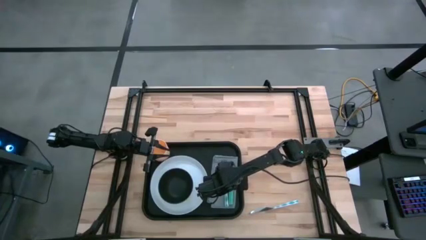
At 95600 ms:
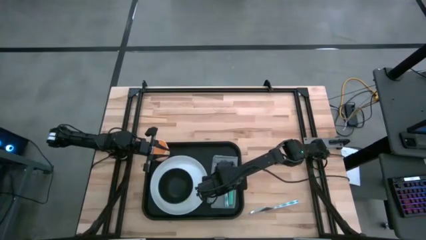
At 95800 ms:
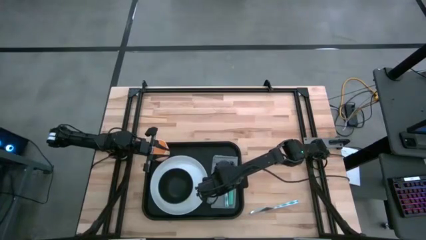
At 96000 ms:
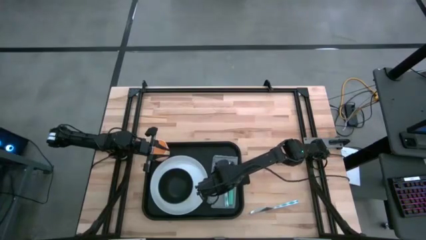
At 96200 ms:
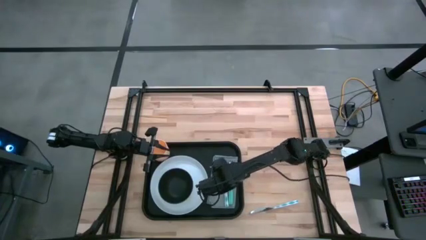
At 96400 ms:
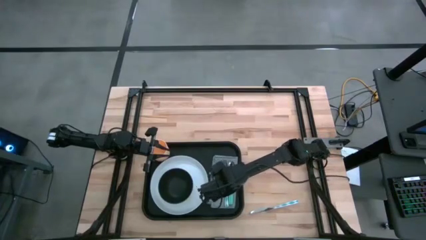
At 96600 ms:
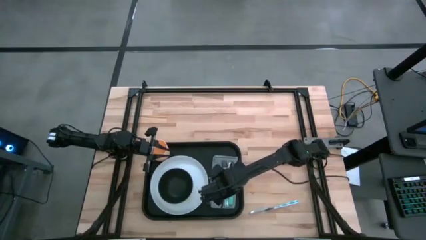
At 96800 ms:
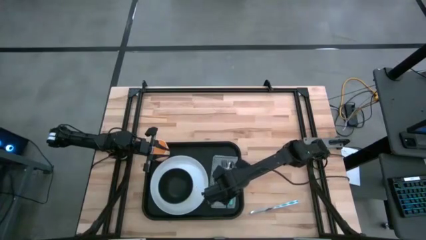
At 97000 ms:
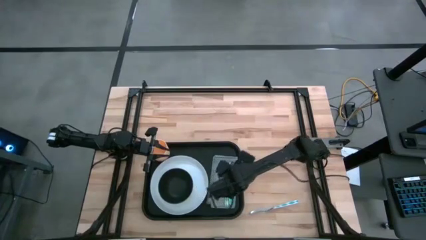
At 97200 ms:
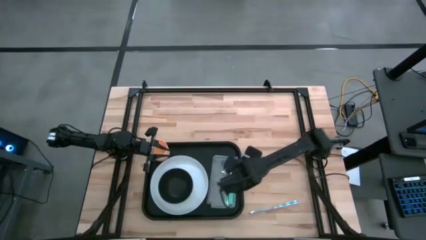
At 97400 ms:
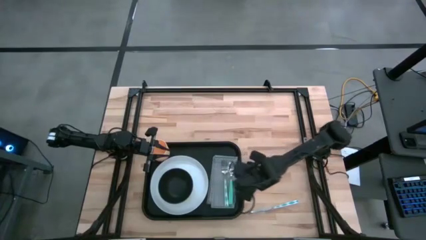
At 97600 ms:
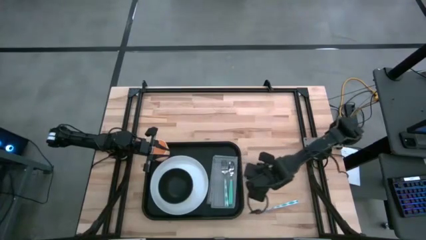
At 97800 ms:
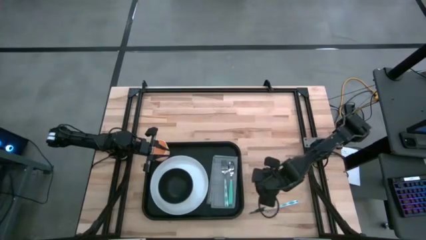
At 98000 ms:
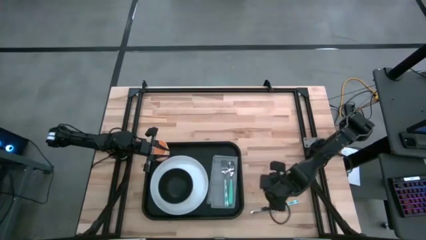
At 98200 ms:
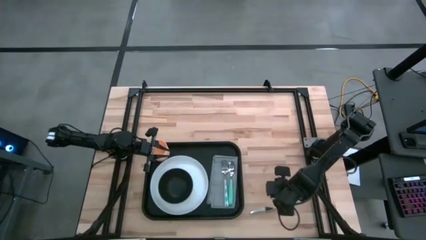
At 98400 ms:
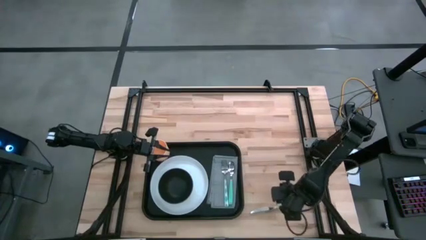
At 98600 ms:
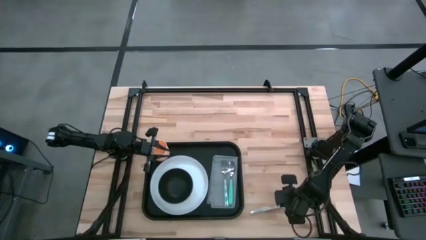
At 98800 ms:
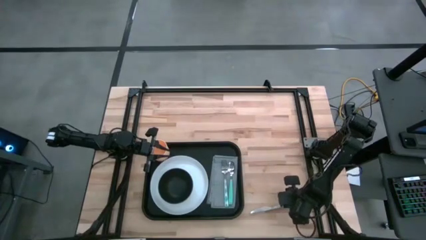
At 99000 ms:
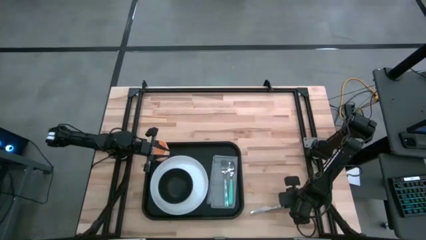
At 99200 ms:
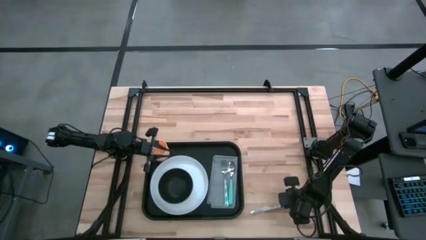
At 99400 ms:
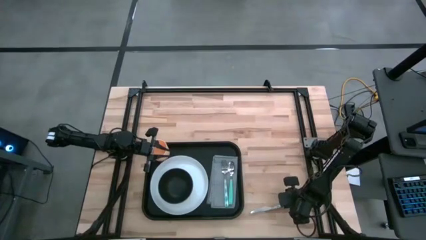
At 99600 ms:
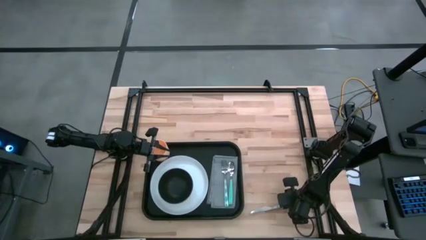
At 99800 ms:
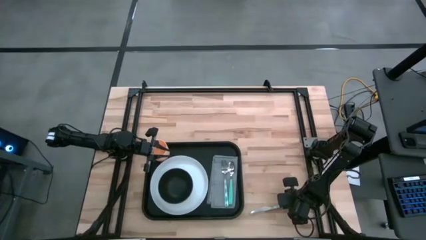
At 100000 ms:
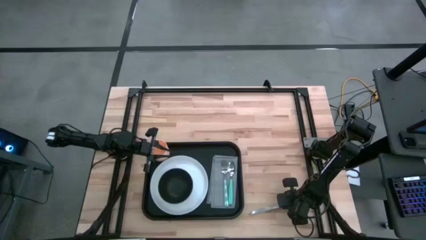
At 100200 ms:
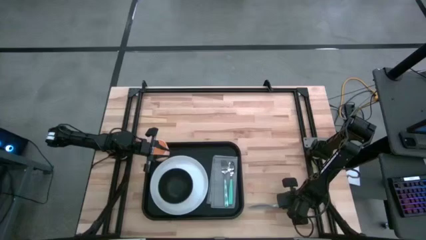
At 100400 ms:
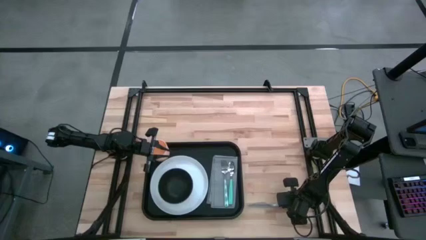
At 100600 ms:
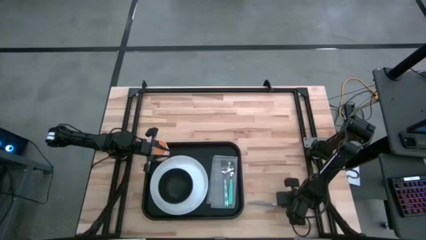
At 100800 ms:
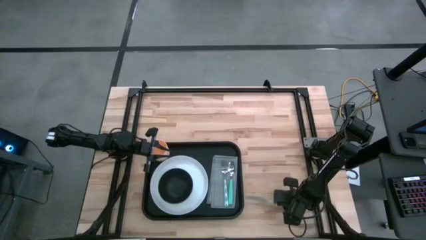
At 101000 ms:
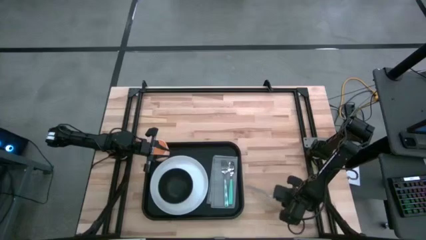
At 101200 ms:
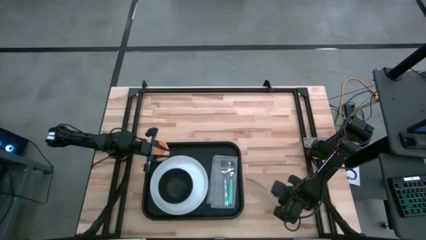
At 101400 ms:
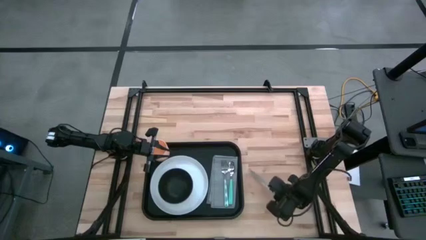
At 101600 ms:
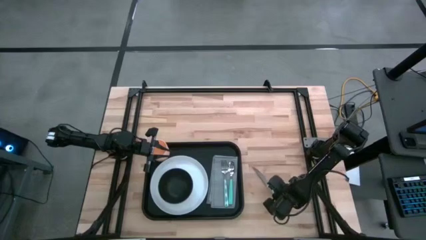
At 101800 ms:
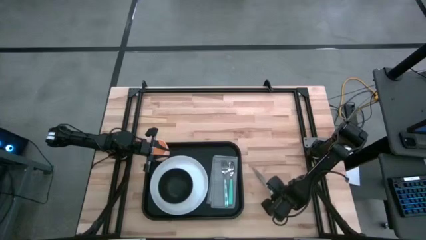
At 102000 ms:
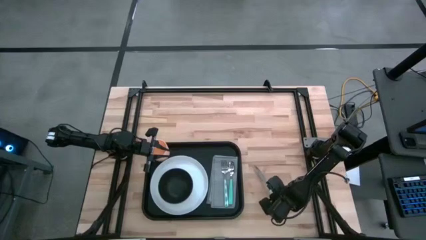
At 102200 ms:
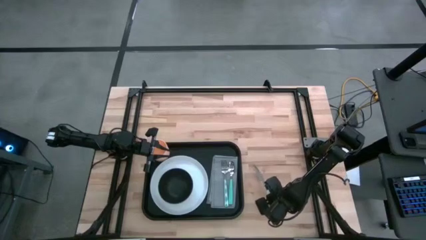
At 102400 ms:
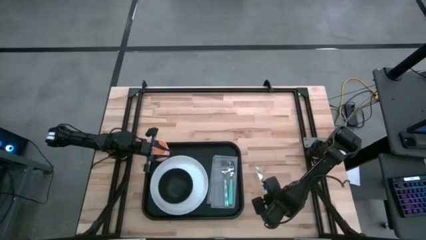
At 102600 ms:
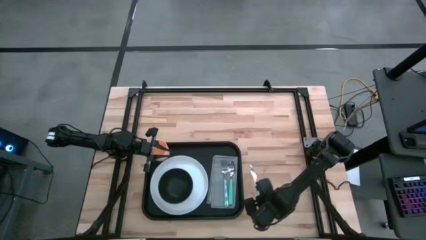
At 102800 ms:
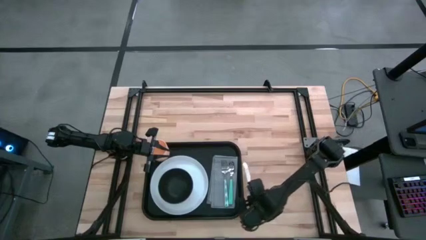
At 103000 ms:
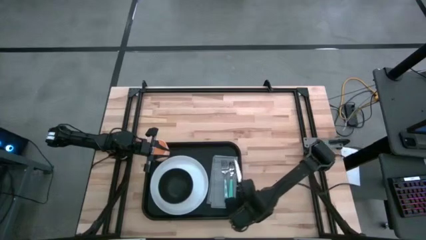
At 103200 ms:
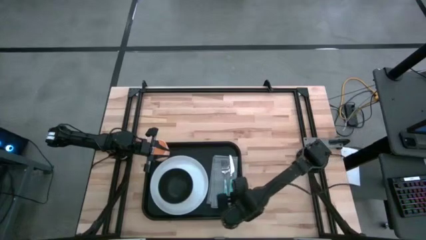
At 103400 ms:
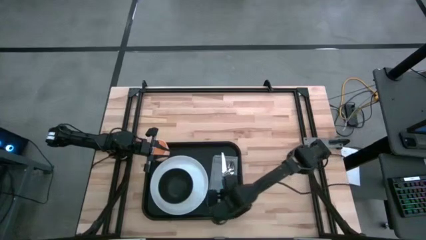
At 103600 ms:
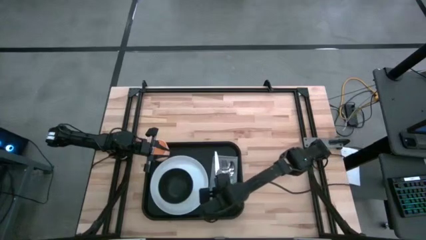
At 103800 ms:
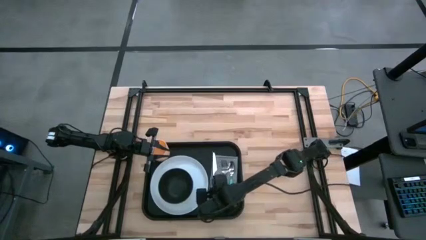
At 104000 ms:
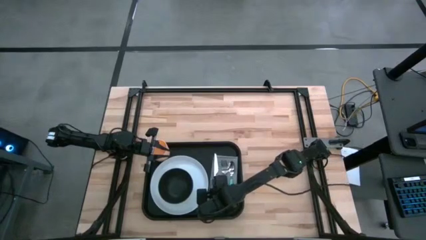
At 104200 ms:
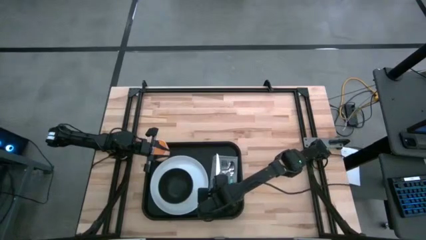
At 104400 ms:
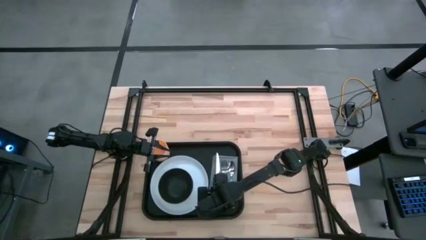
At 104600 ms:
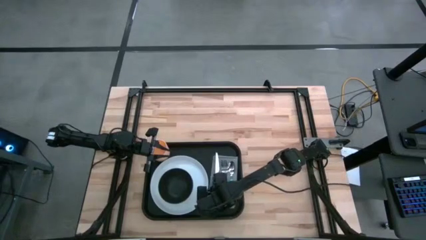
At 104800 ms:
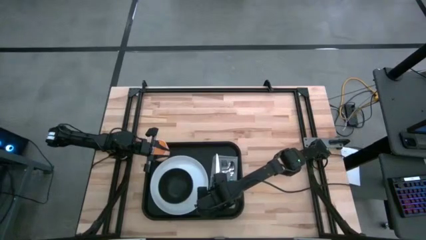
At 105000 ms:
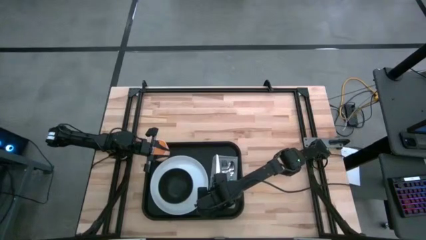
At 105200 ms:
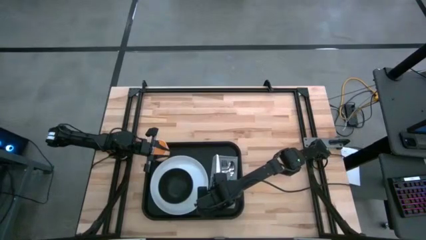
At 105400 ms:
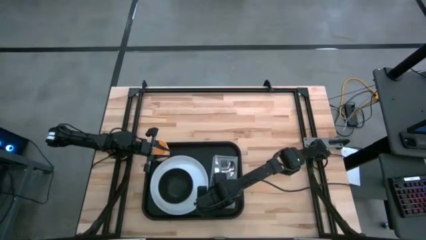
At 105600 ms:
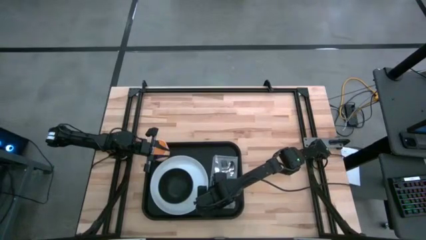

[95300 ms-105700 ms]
Task: Set up tray
Put the green knife to the left of the green fork on the gray napkin on the black tray

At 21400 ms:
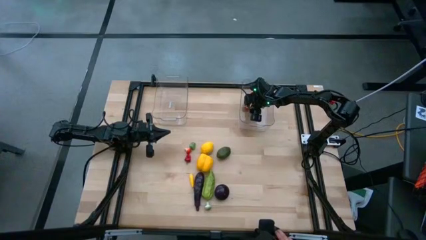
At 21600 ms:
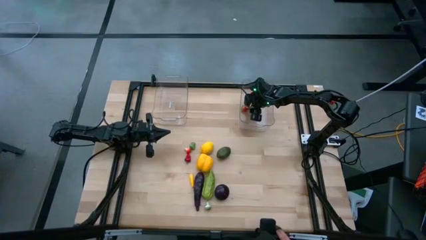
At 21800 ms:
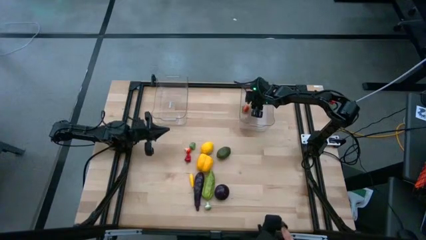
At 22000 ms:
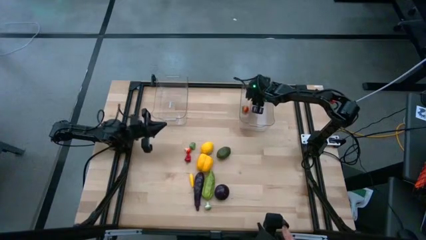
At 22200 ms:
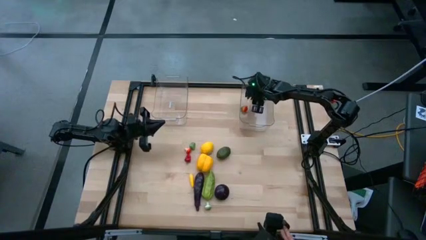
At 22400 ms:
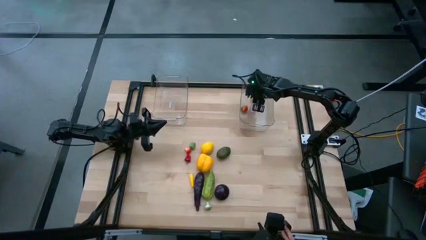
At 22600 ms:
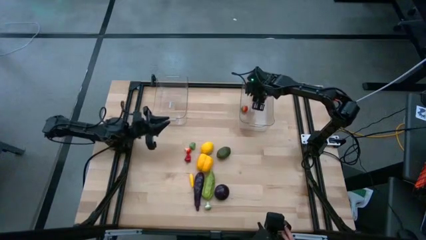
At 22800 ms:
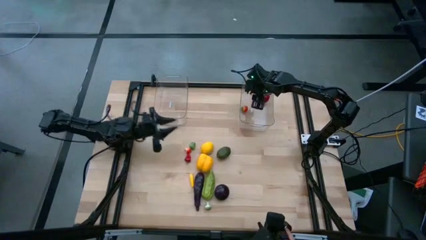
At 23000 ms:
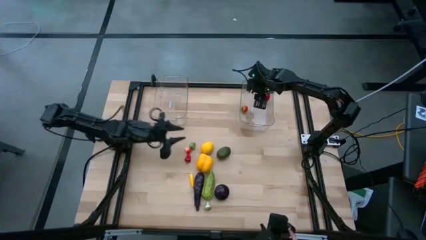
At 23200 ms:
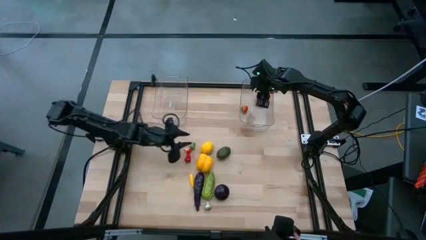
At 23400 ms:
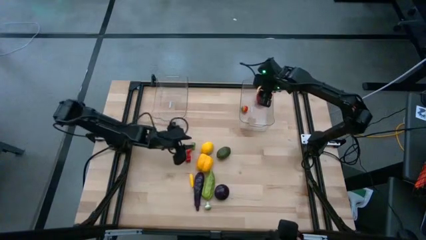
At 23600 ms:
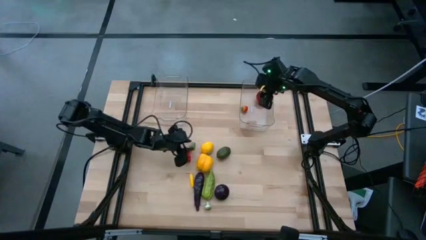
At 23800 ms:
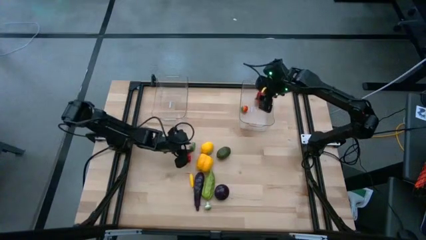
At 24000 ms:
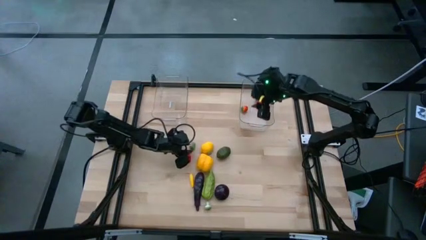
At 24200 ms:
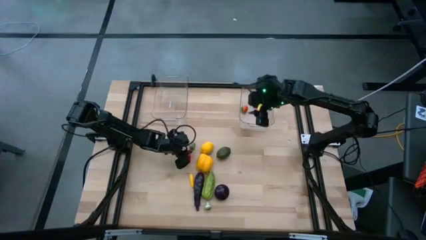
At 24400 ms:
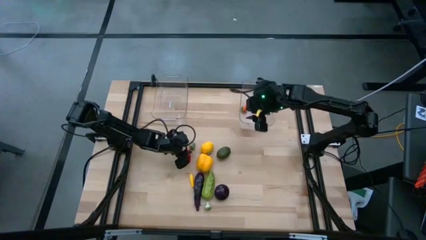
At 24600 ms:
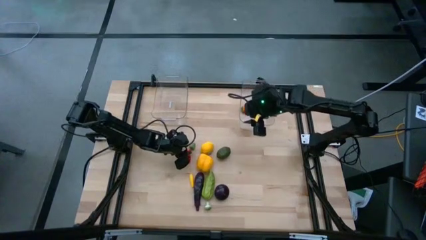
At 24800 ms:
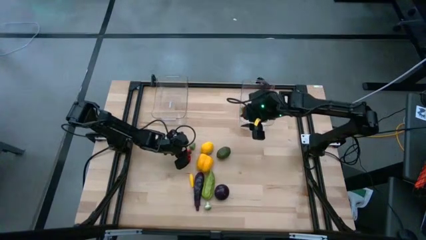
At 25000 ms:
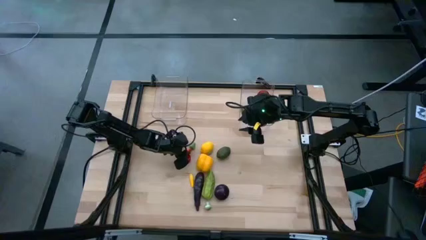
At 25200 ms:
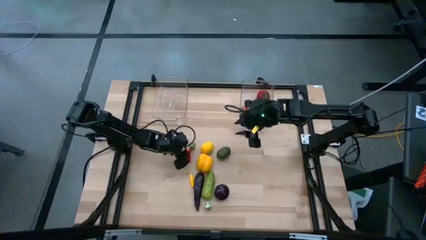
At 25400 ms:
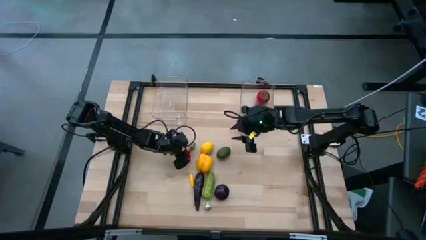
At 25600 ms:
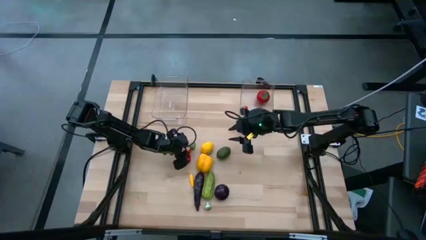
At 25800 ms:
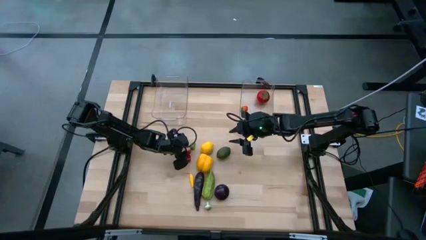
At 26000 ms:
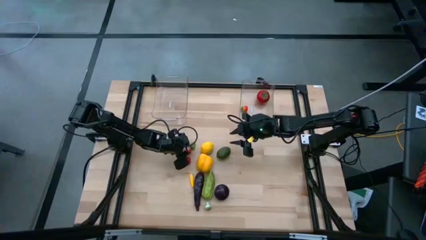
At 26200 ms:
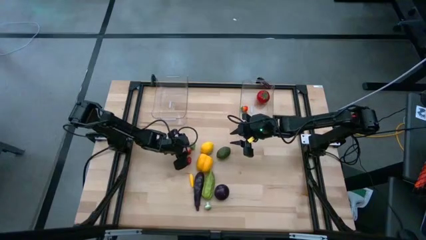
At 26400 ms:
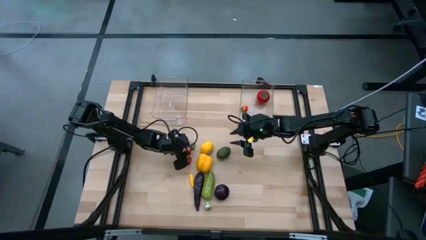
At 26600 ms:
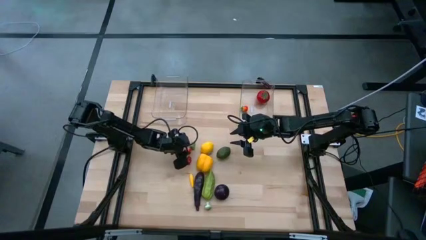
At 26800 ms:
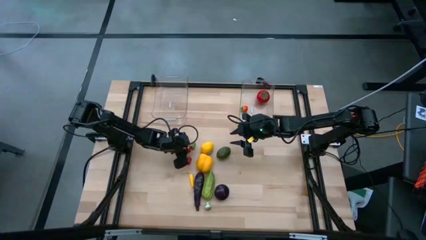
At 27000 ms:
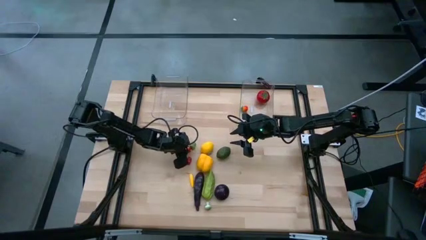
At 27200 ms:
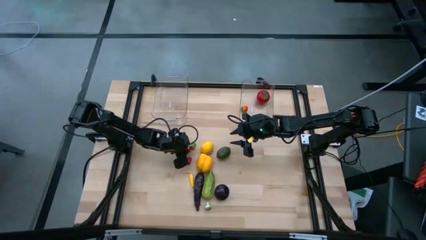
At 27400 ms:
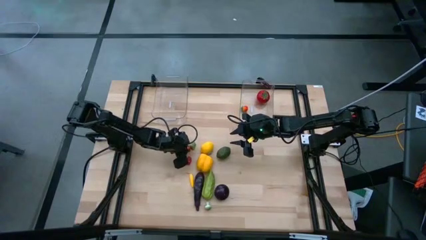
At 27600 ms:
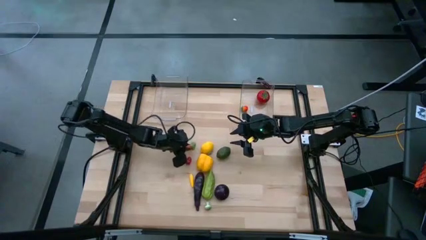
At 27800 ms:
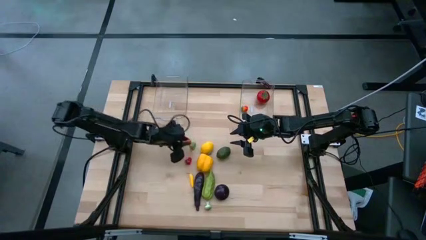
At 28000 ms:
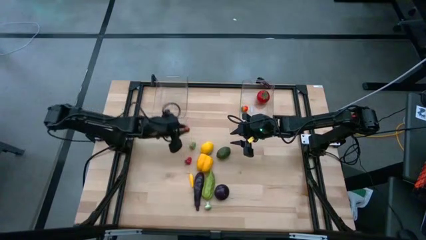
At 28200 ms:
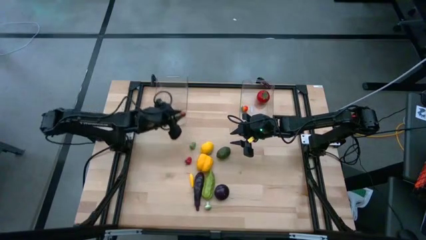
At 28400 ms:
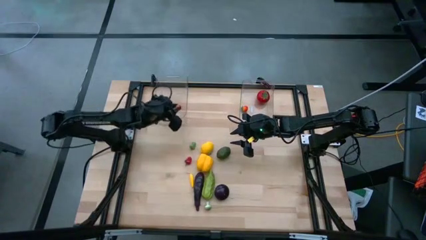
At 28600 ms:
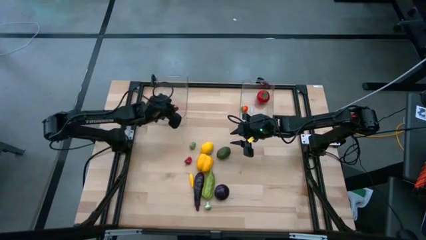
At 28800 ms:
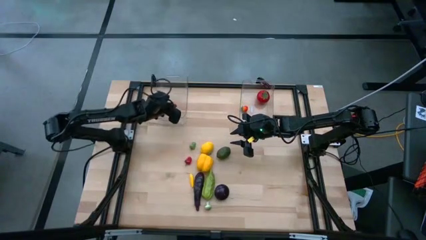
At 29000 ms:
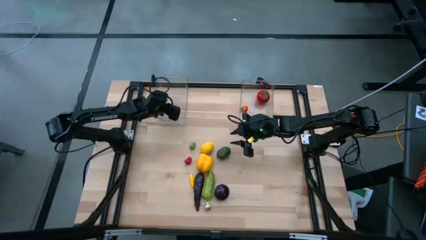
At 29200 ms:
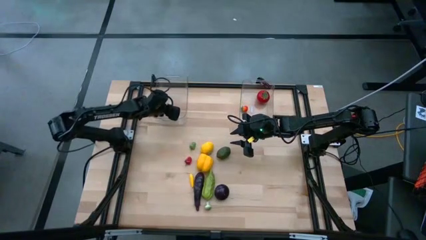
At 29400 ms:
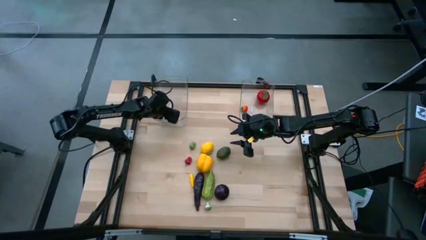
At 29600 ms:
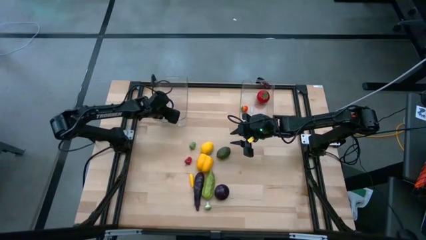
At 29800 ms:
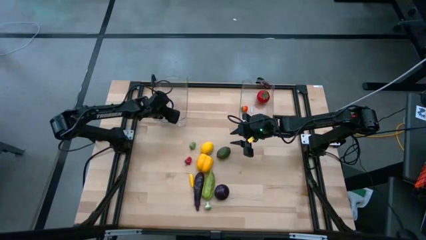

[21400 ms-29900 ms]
Task: Sort produce into baskets
Put the orange mushroom into the left transparent bin
